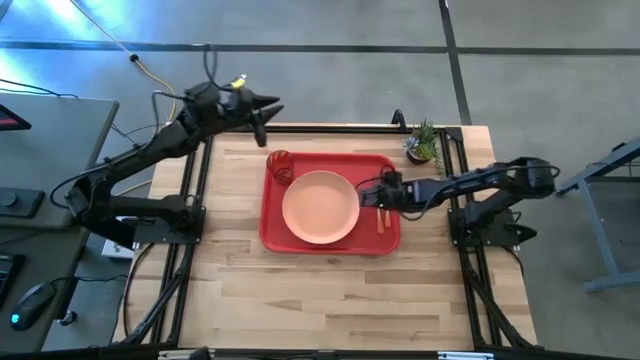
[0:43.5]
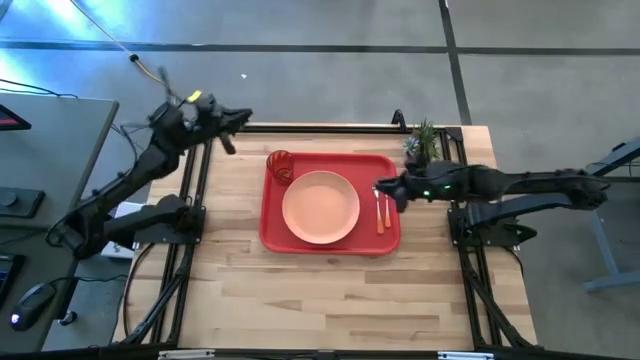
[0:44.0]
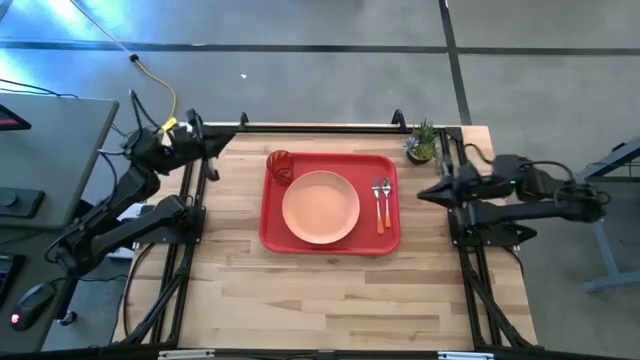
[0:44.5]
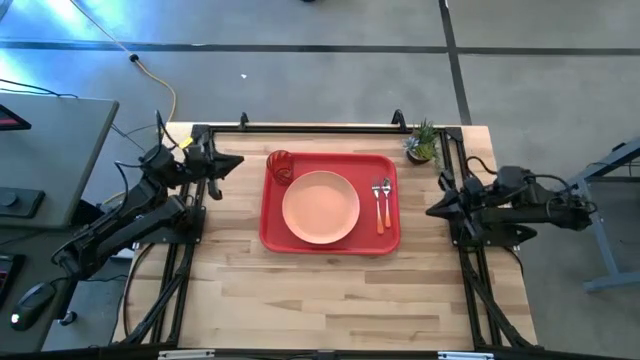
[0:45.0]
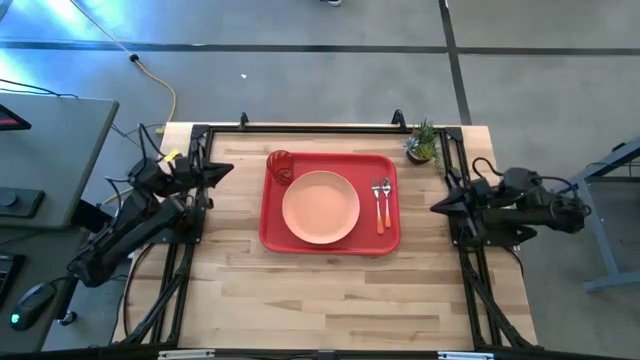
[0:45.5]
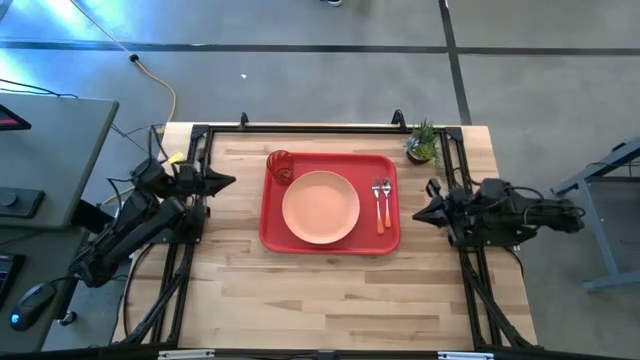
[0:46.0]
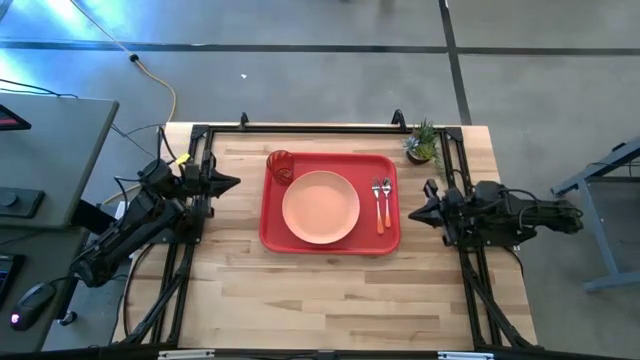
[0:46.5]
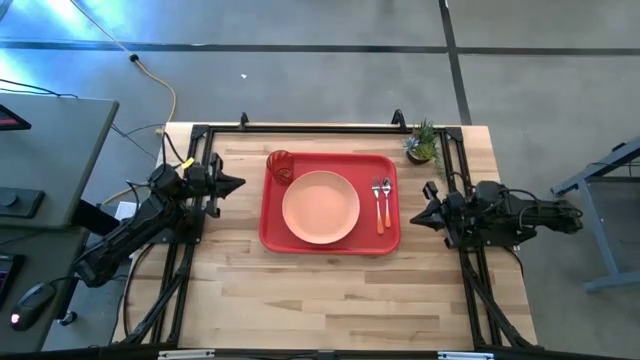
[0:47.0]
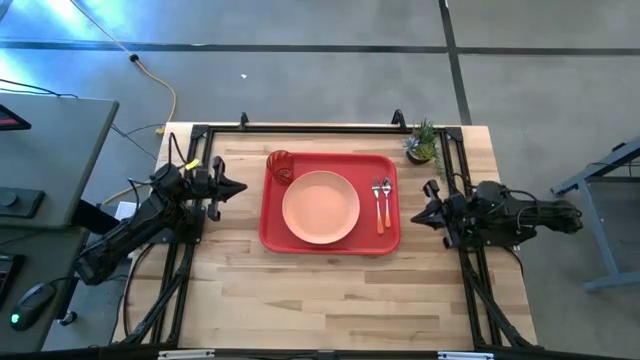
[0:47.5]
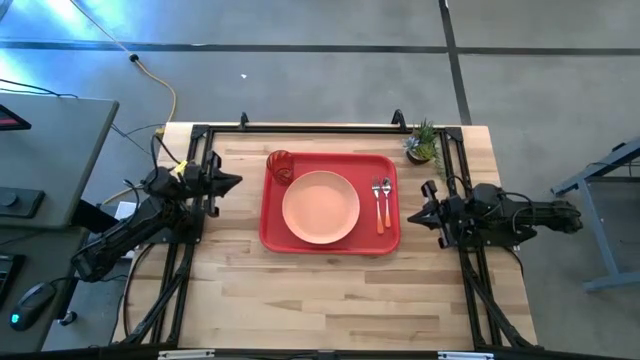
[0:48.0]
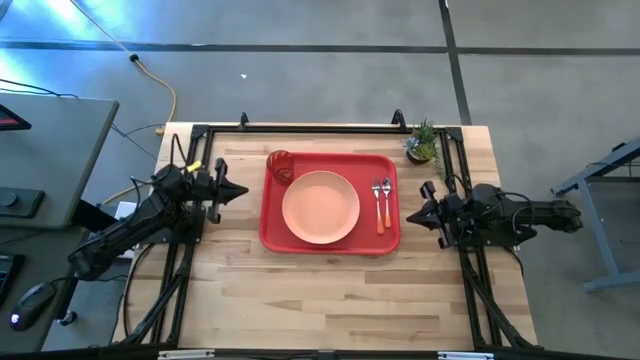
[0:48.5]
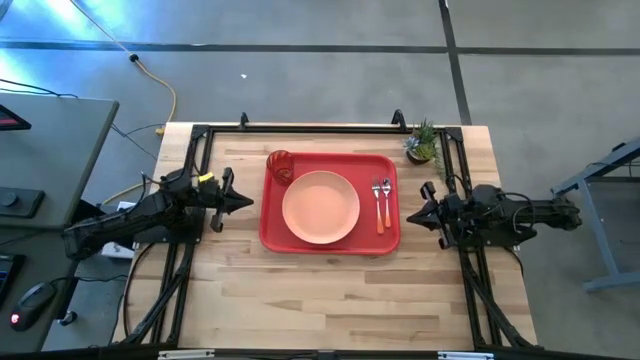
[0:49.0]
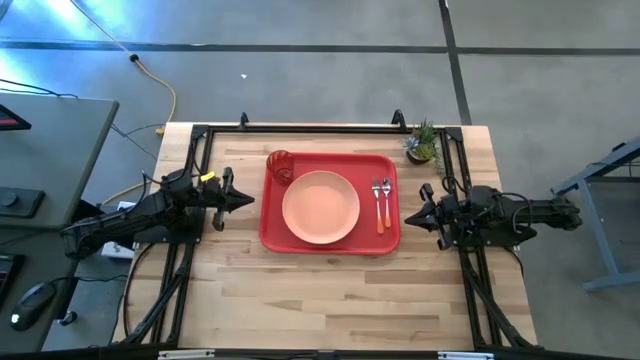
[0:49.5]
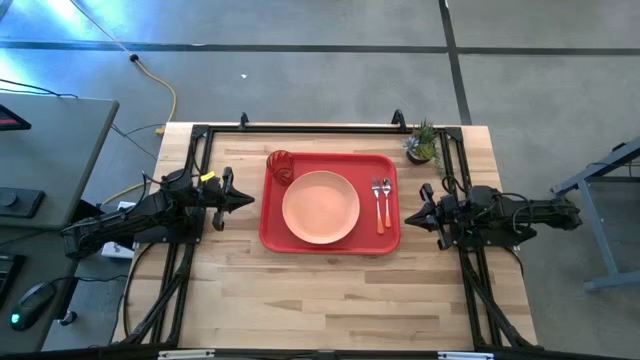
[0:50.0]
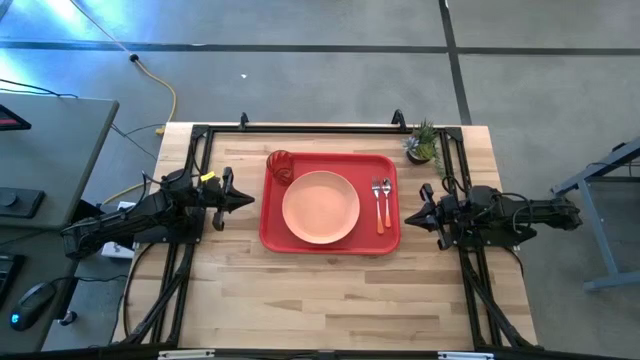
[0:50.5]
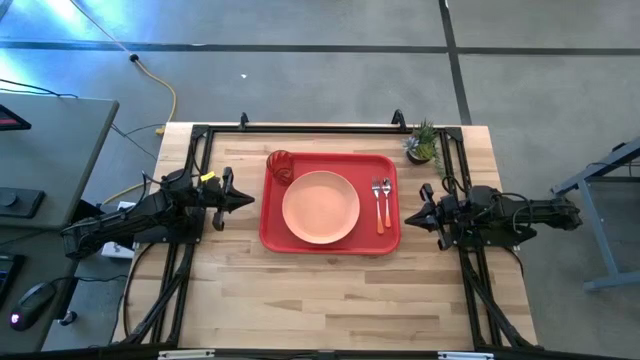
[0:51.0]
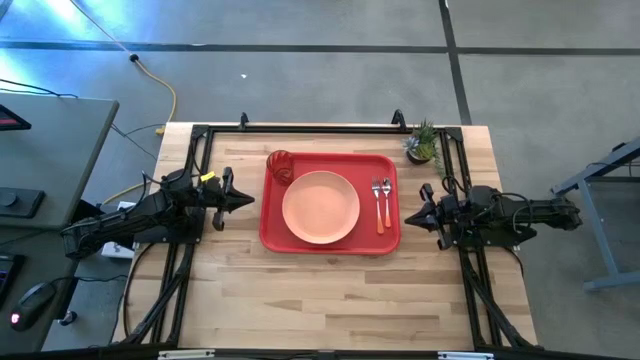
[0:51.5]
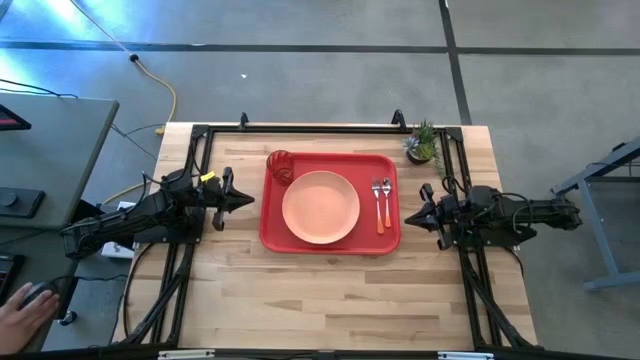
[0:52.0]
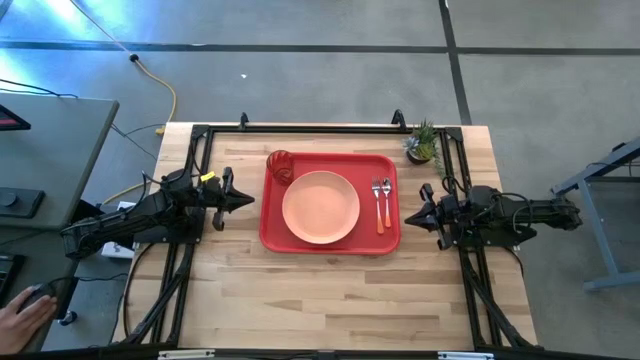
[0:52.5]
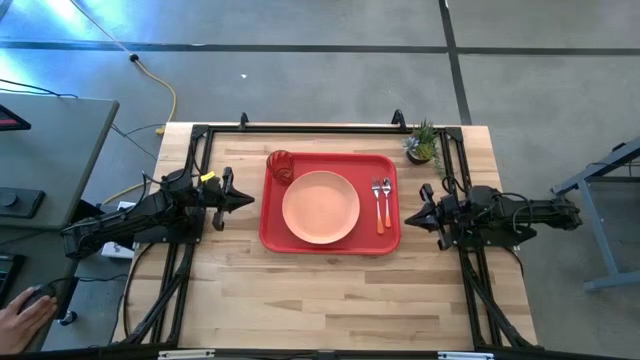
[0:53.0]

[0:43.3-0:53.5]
Task: Pick and place plate/cup/fork/spoon on tray
Return to Home Position

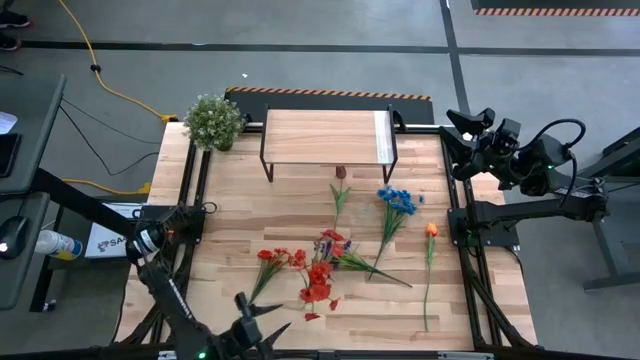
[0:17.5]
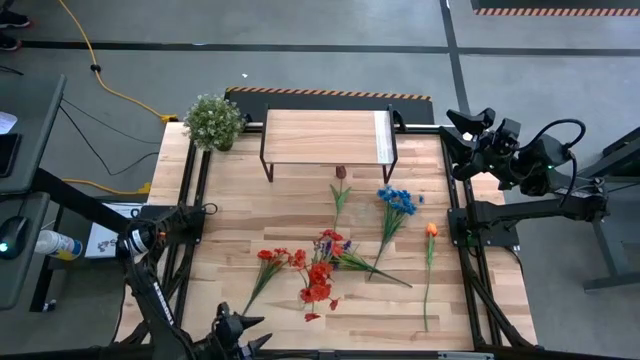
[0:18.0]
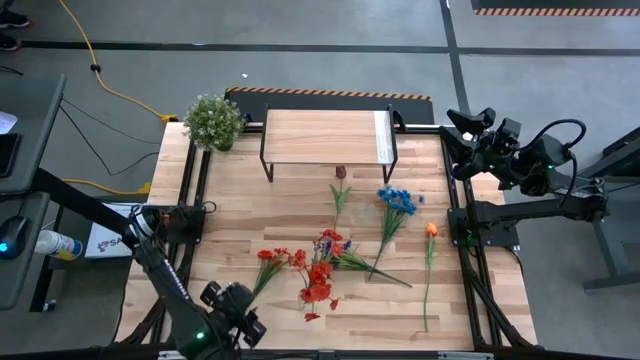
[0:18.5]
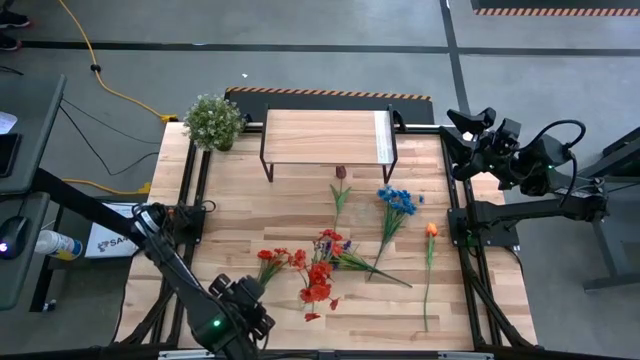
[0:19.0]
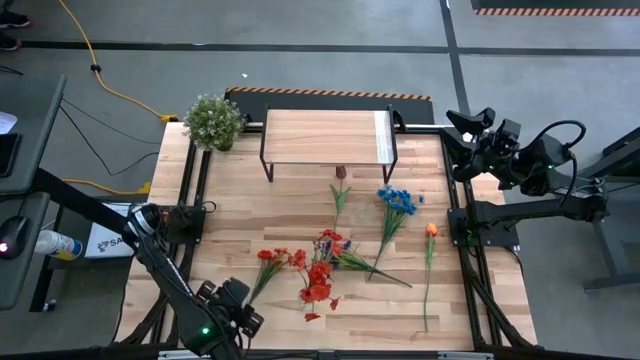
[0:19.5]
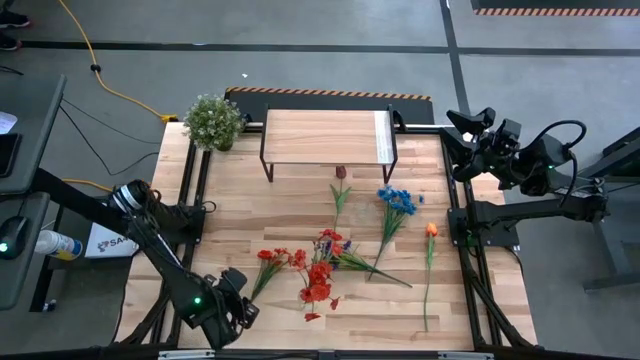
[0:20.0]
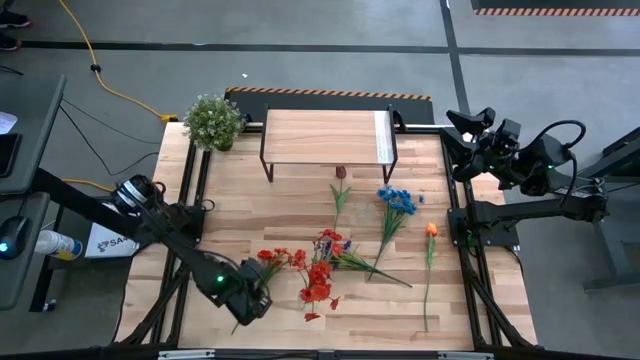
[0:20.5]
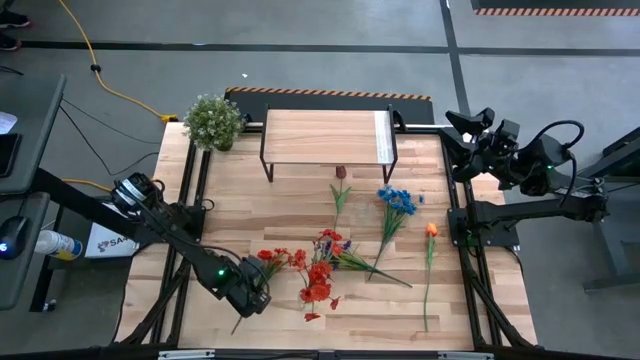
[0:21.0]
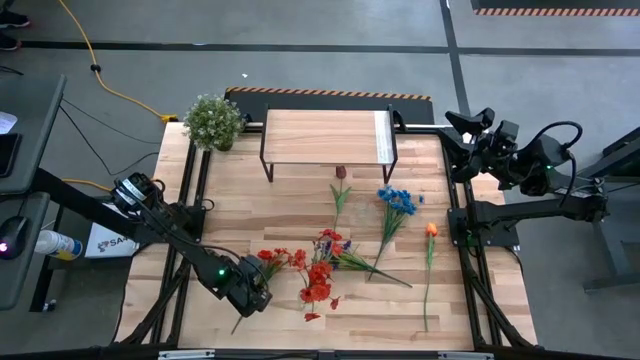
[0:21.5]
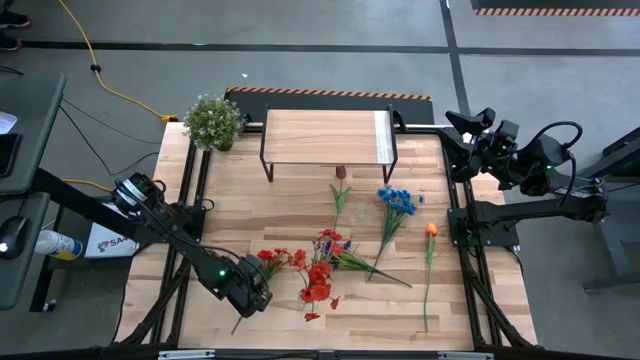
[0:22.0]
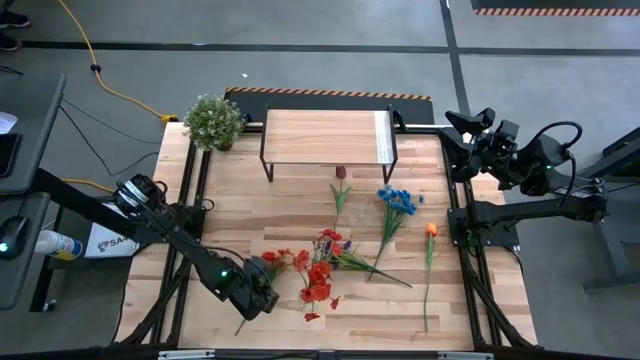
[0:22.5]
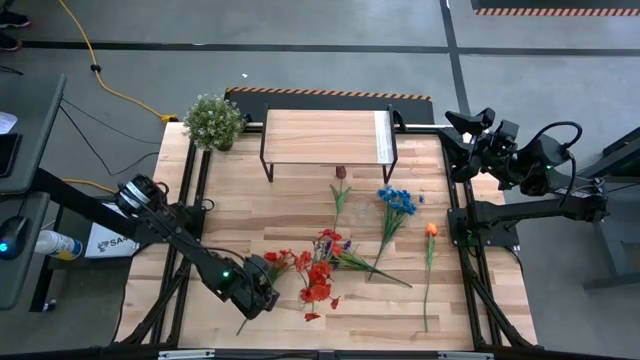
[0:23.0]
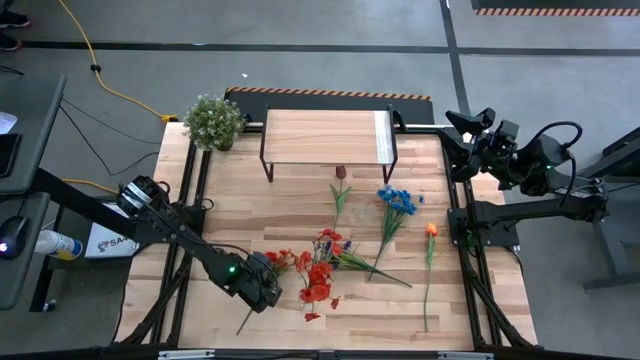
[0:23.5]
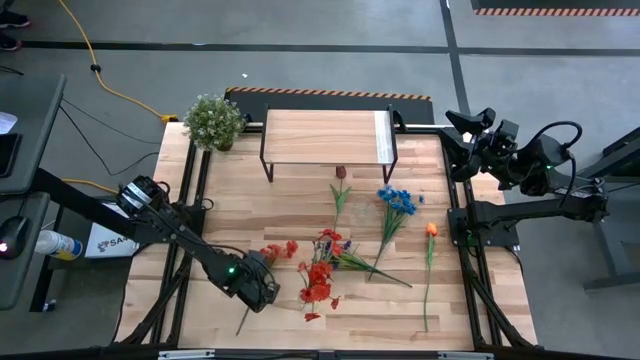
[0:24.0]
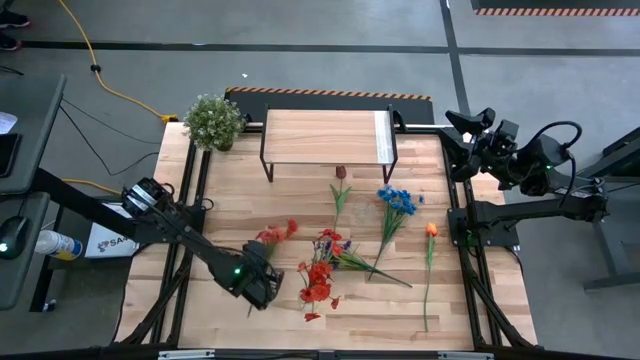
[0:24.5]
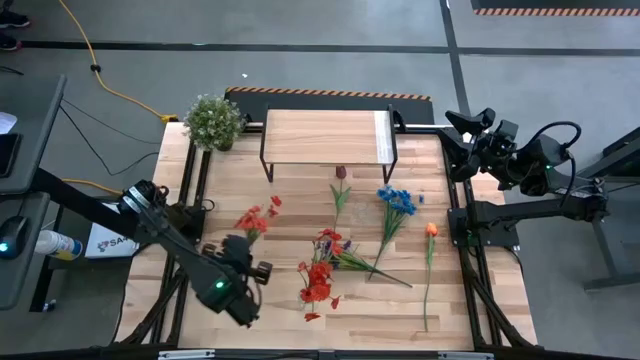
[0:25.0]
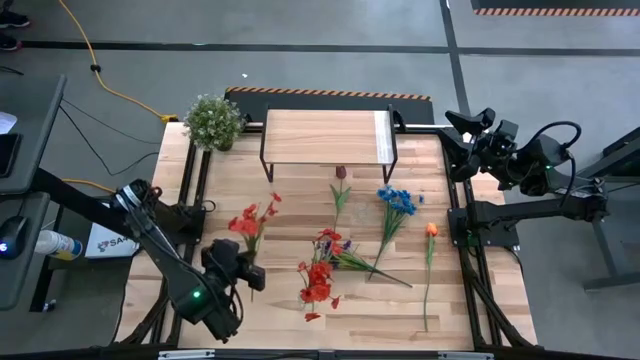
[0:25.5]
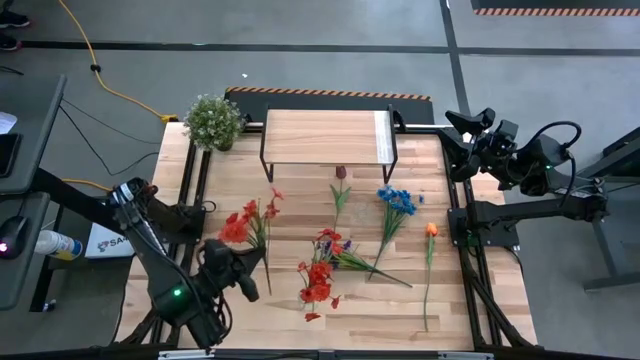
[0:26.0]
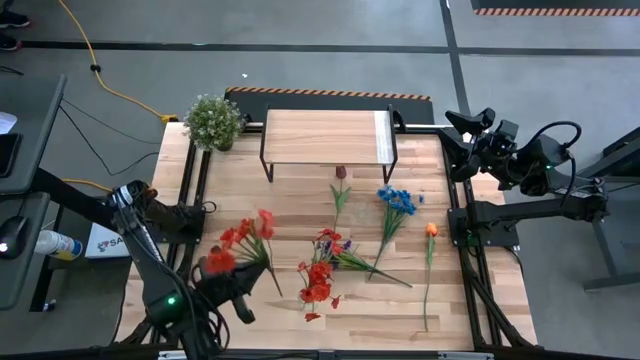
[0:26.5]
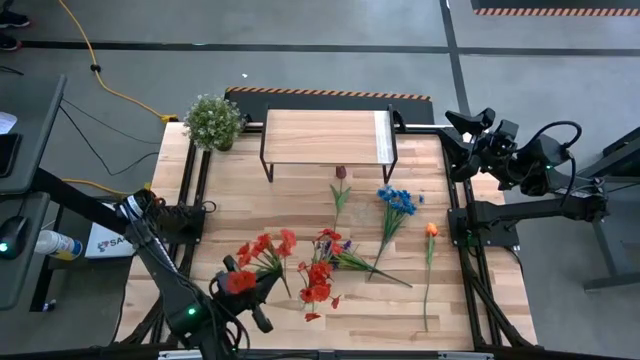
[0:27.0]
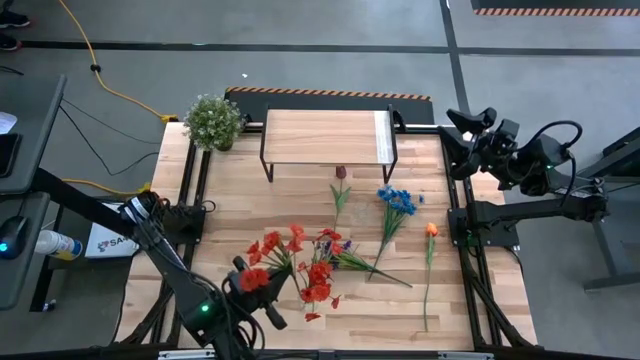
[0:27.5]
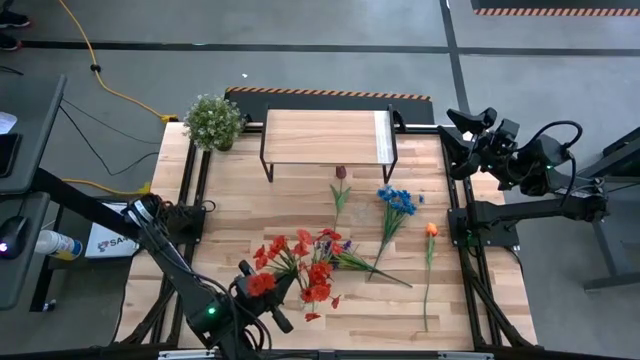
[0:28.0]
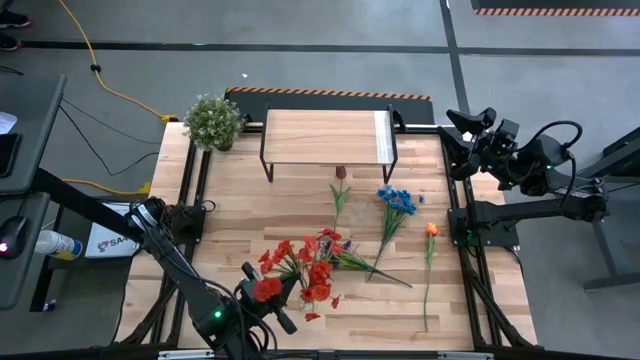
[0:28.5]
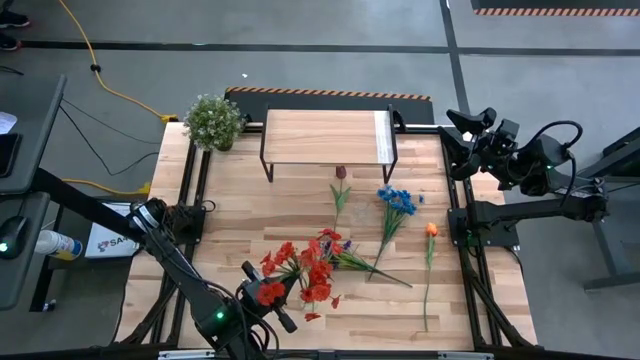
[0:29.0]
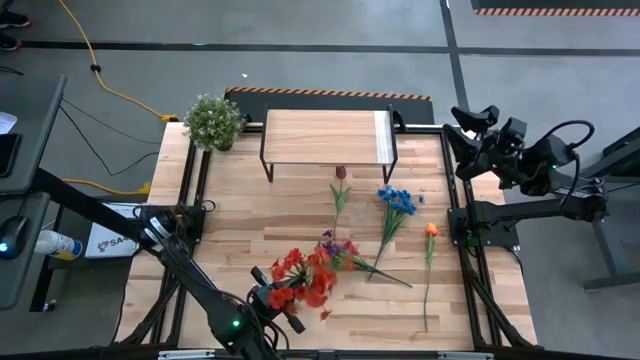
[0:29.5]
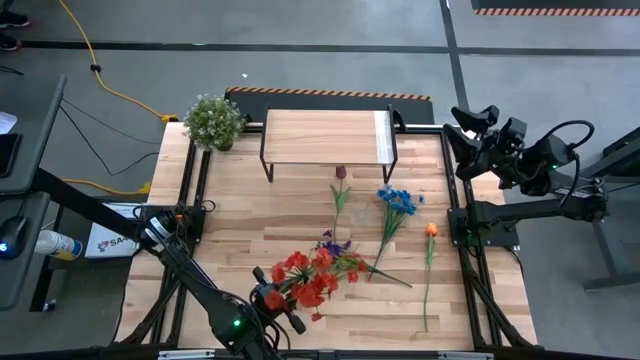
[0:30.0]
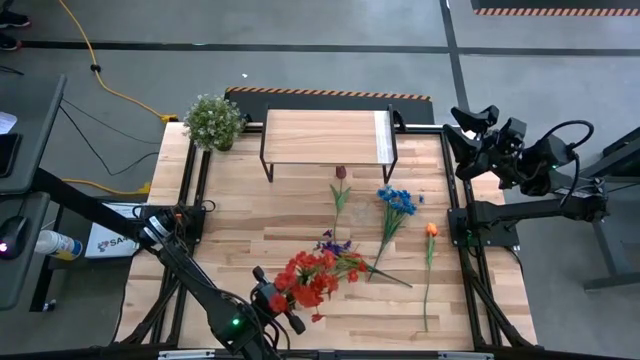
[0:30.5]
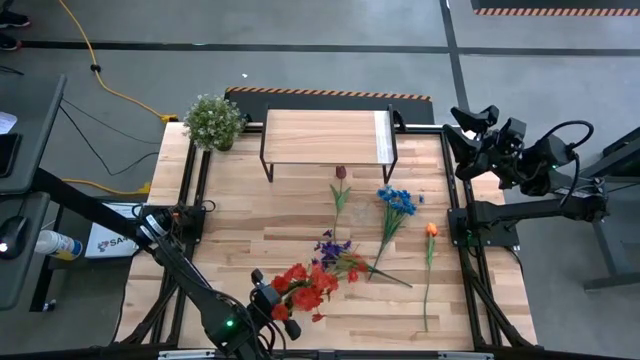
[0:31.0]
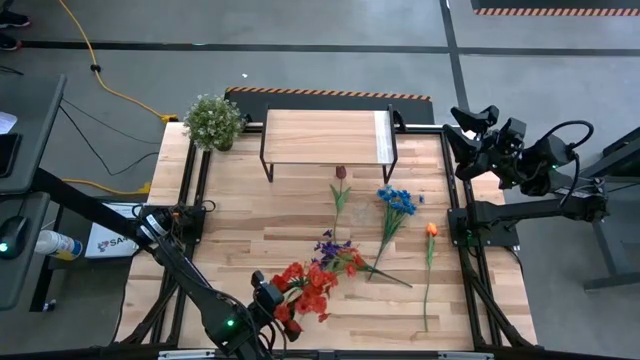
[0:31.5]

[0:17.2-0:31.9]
Task: Pick and place flowers into a vace then onto a shelf
Put the orange flowers into the bottom transparent vase
